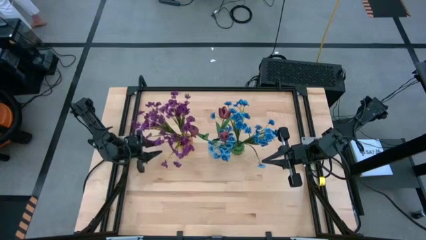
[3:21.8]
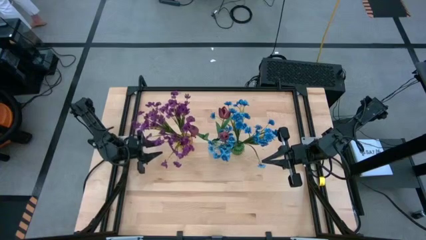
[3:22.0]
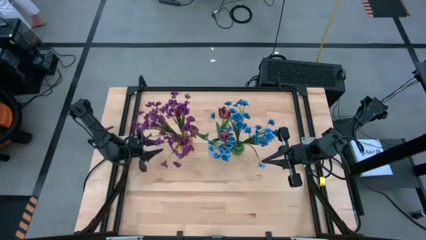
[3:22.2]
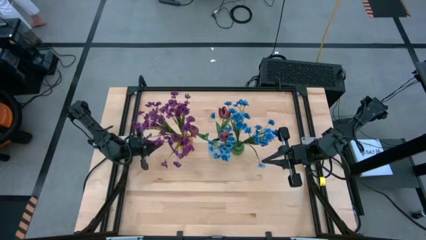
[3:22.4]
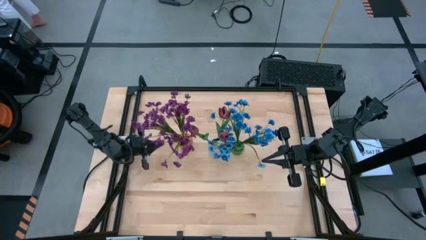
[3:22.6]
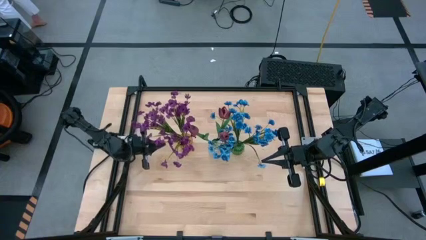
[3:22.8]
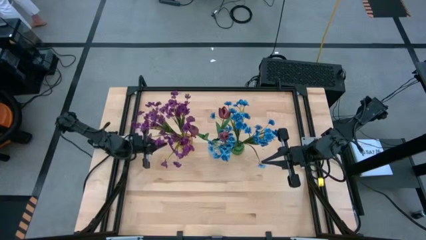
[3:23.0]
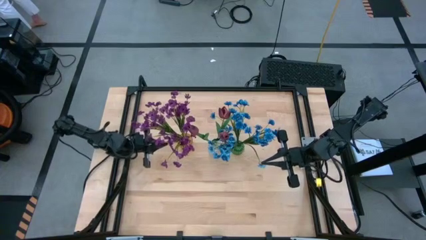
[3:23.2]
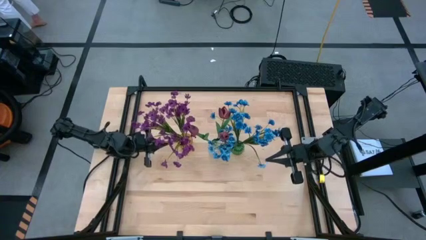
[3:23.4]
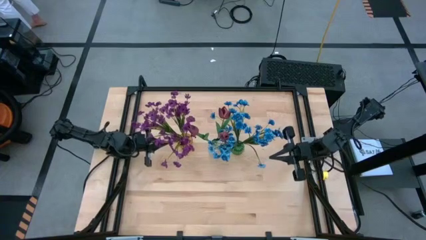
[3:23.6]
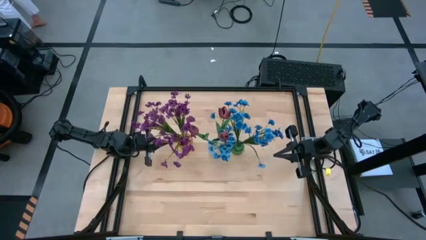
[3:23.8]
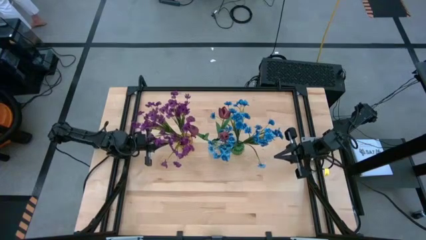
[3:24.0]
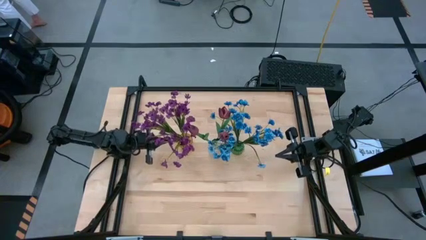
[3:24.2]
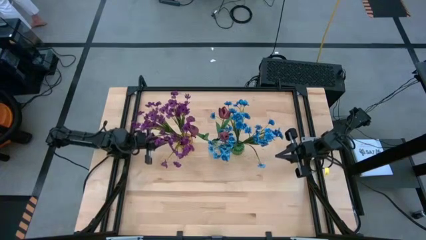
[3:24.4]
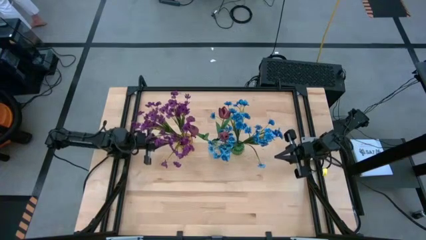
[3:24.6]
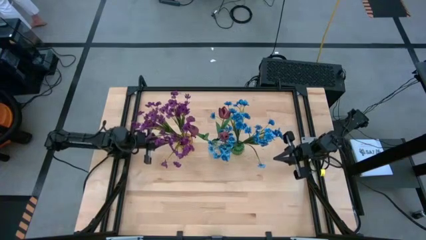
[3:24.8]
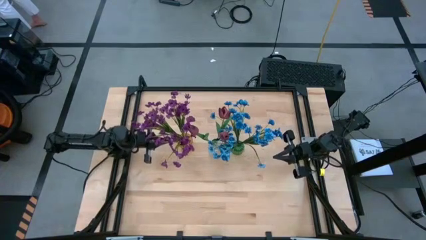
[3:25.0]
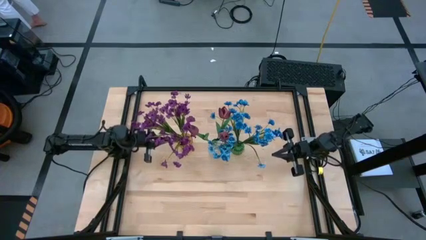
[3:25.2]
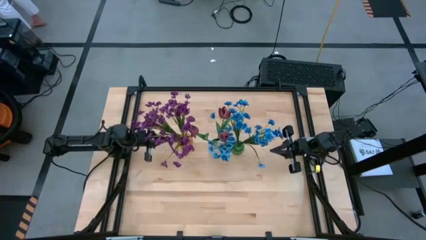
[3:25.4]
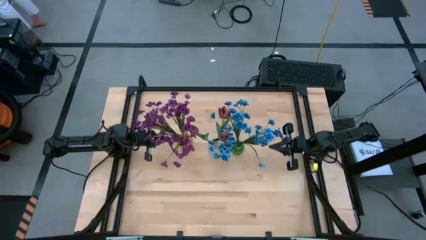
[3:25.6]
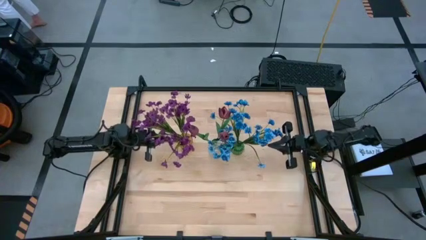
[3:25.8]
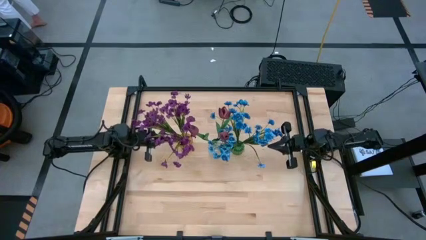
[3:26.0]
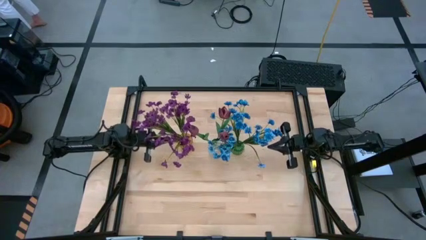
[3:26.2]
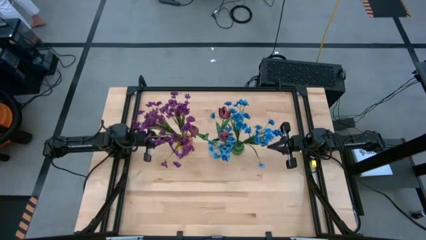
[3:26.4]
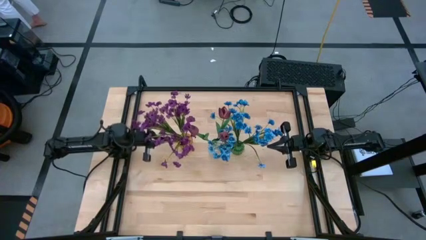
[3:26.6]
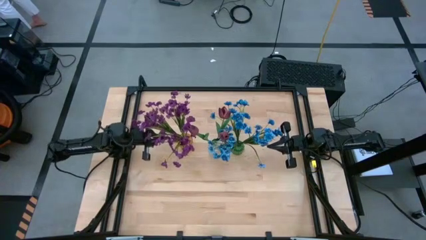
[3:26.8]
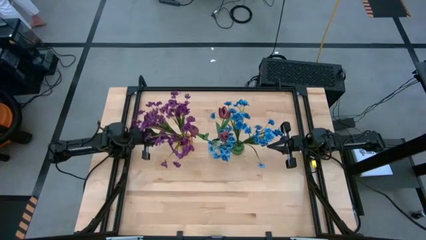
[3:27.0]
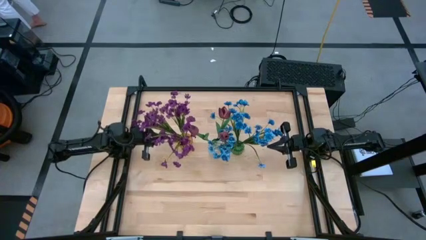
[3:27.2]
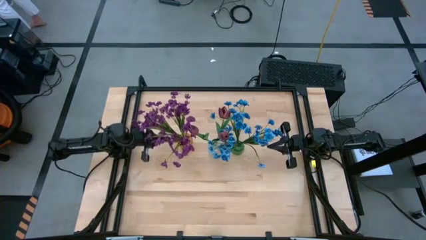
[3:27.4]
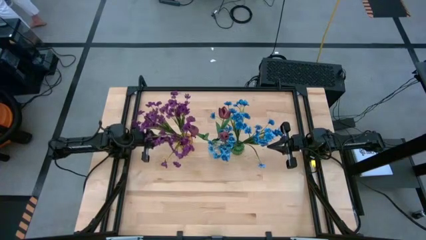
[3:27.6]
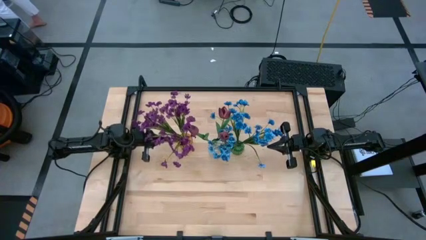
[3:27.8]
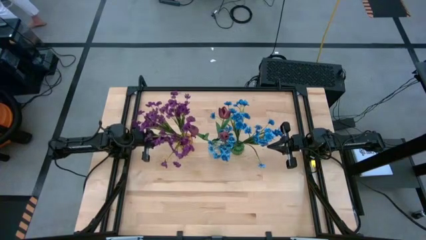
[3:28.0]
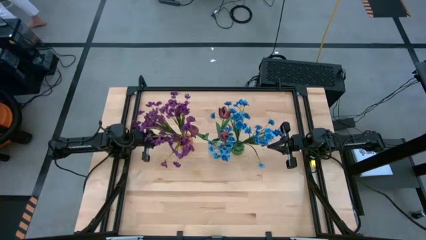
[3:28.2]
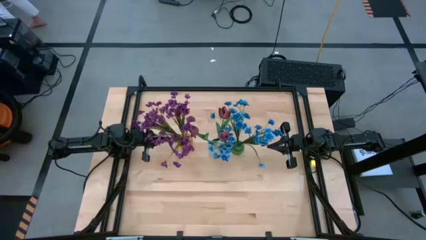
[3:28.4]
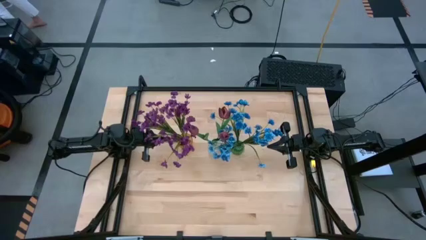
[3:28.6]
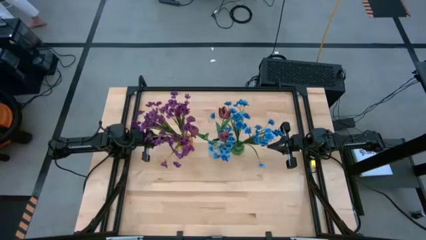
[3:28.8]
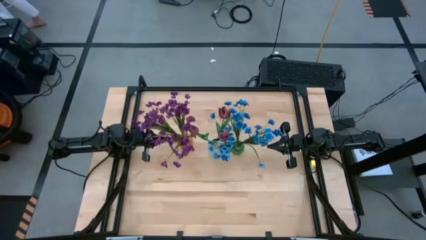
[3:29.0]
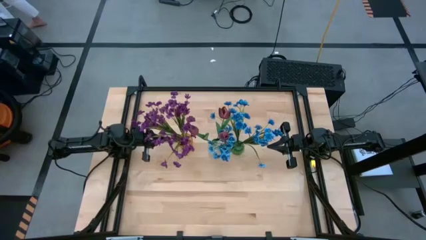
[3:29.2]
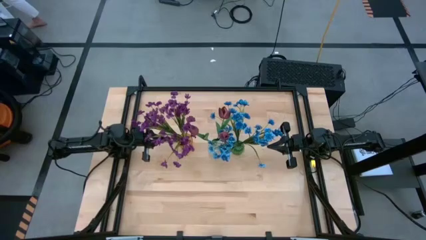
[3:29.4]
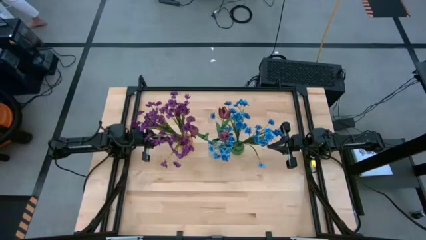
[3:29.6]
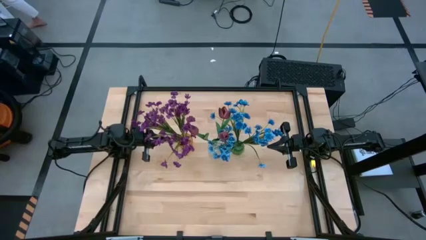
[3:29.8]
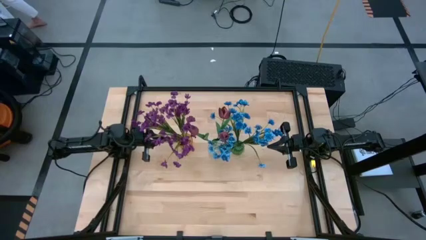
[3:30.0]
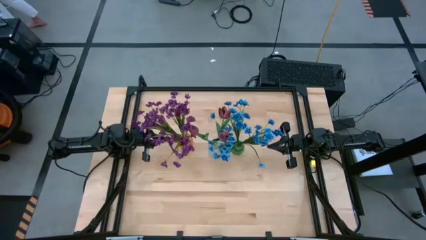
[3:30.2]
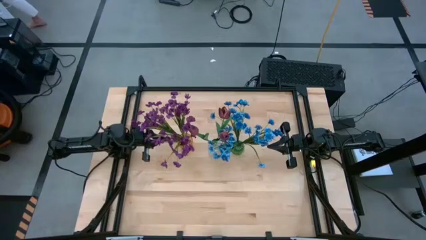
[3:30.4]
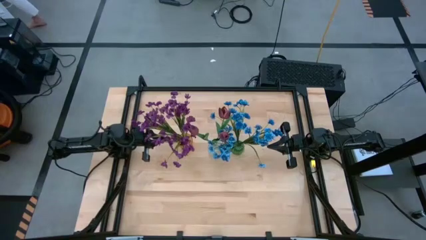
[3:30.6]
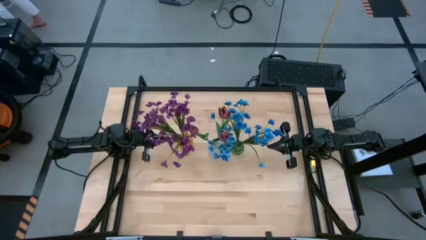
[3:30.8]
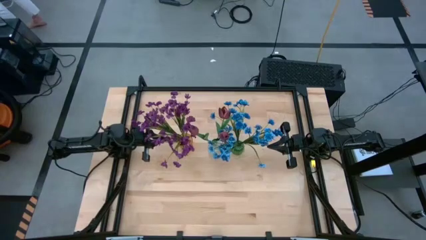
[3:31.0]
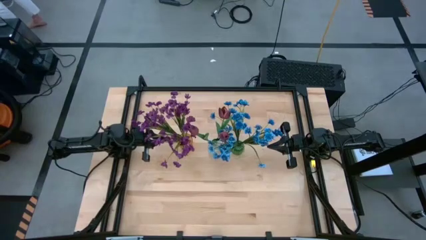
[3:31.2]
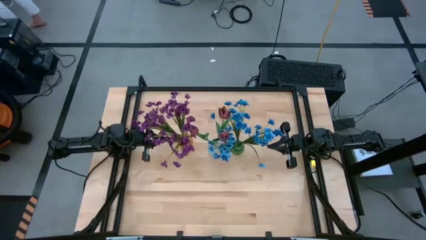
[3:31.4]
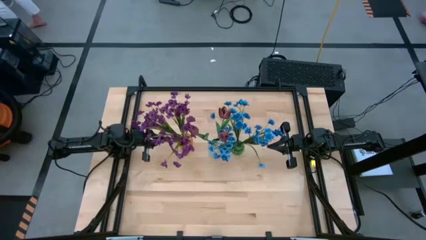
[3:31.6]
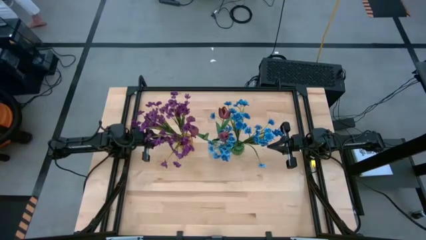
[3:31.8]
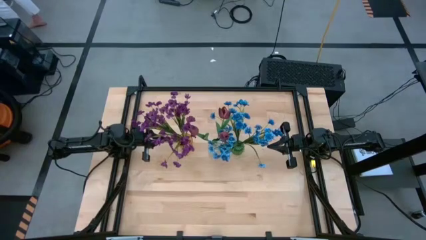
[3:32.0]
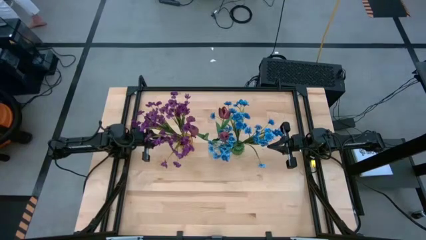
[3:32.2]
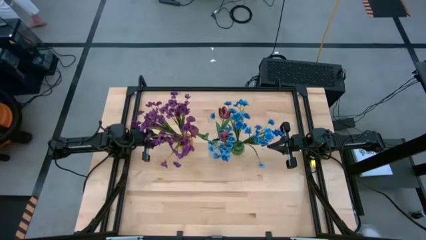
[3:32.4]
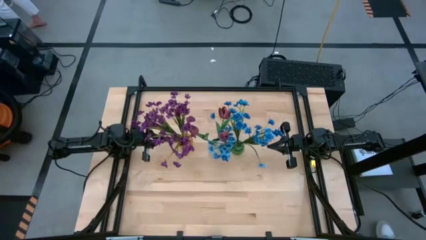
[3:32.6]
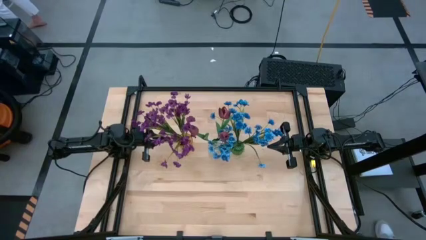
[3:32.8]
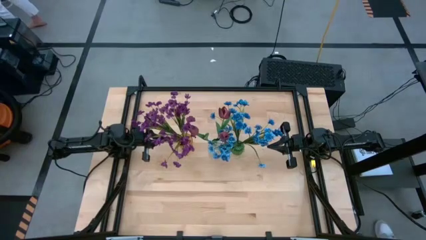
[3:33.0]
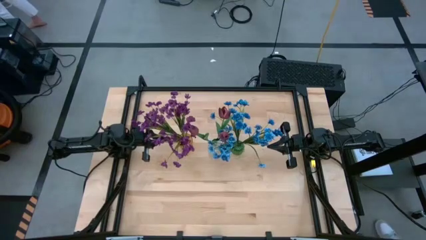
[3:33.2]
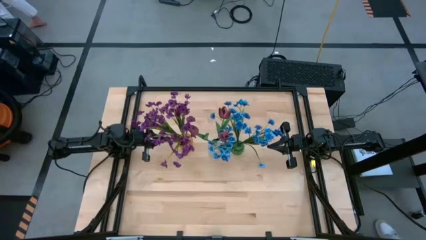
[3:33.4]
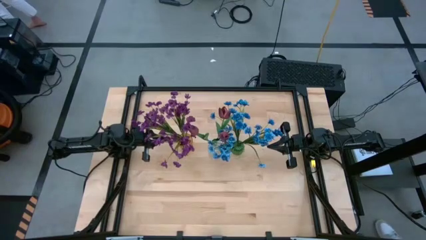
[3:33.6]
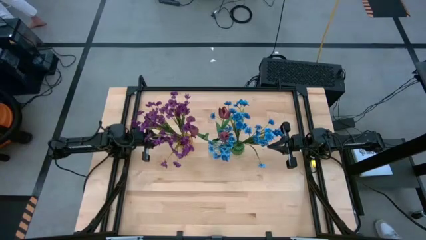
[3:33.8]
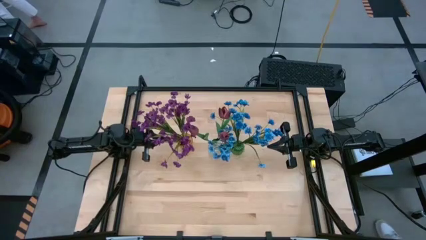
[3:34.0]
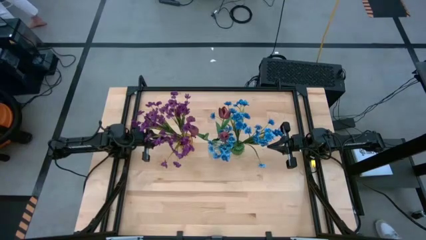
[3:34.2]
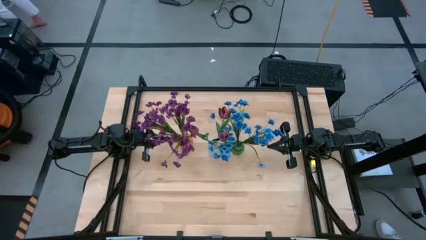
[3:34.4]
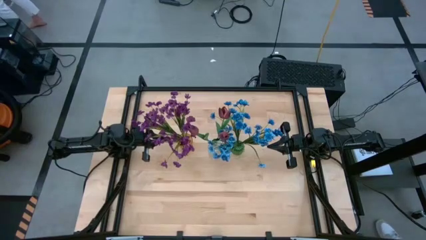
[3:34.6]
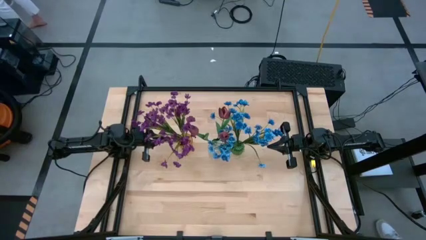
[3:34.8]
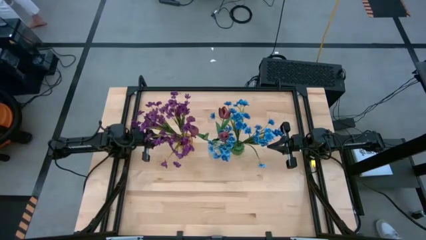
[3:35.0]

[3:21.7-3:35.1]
Task: Sort flowers into vase by color
Return to Home Position

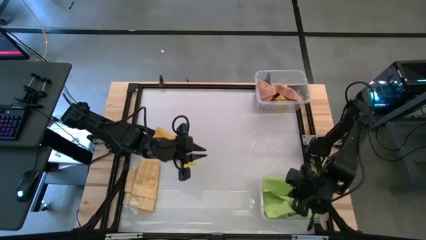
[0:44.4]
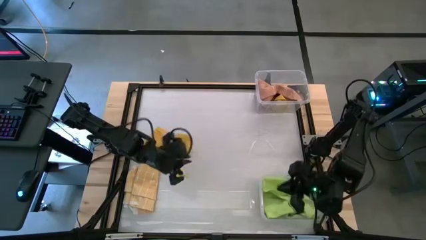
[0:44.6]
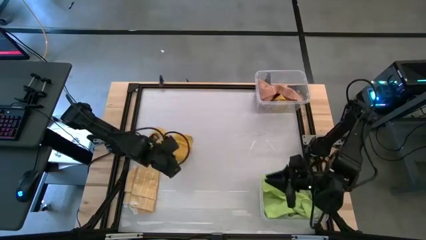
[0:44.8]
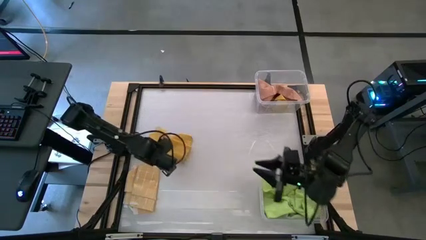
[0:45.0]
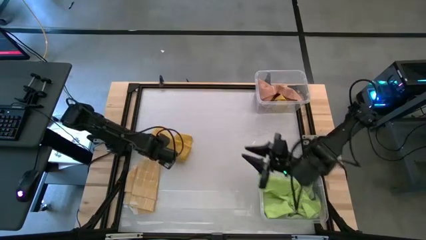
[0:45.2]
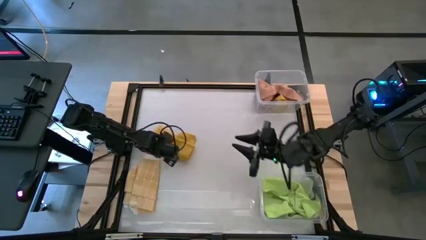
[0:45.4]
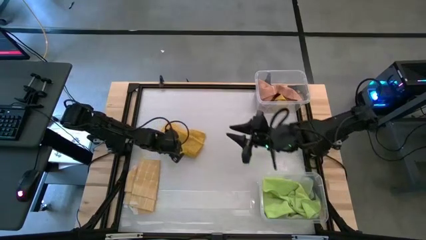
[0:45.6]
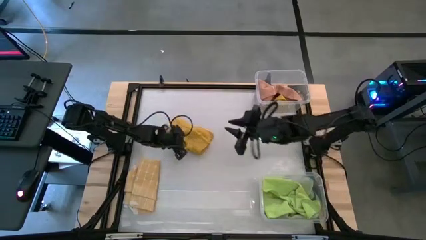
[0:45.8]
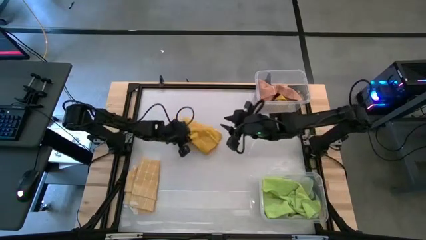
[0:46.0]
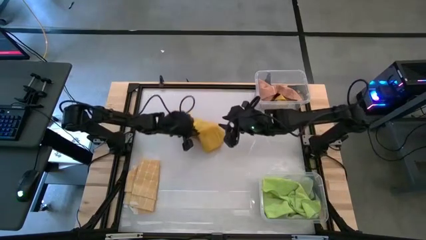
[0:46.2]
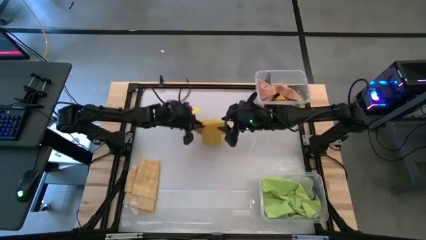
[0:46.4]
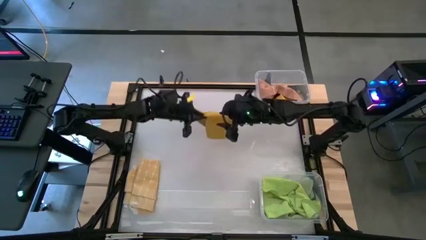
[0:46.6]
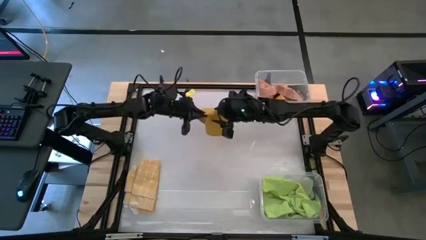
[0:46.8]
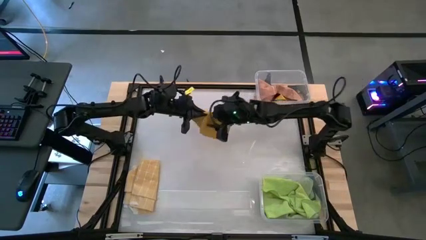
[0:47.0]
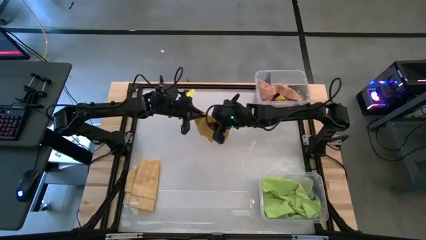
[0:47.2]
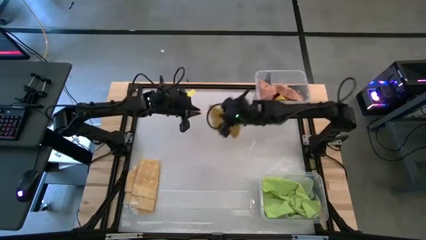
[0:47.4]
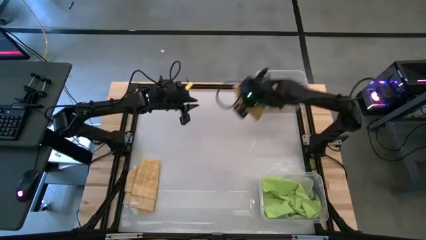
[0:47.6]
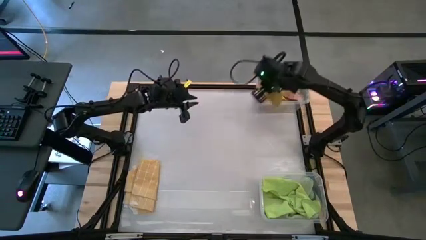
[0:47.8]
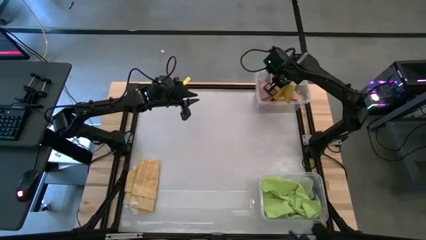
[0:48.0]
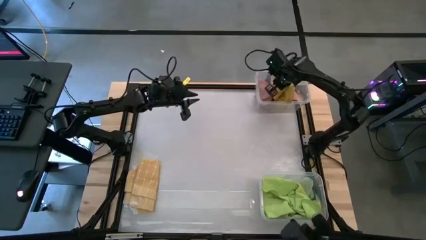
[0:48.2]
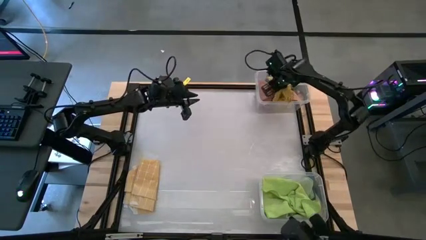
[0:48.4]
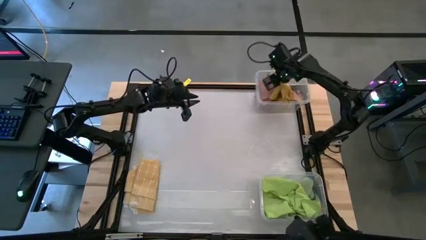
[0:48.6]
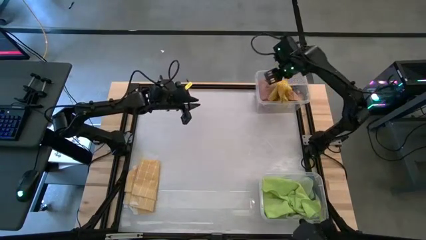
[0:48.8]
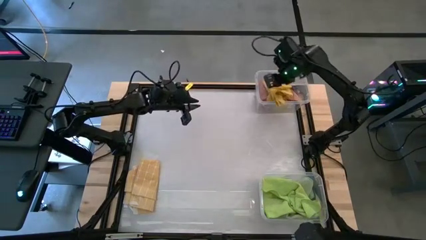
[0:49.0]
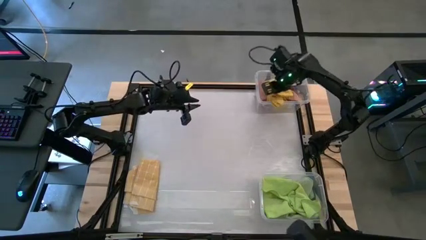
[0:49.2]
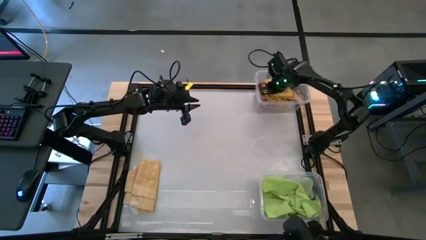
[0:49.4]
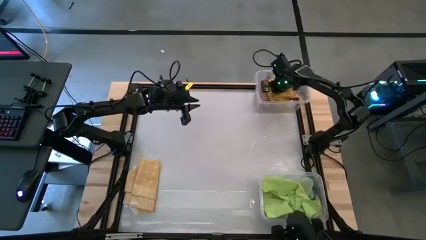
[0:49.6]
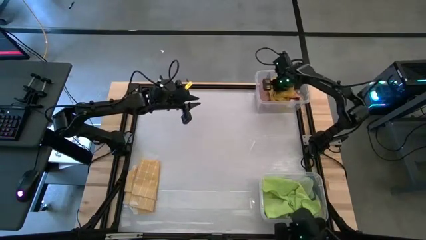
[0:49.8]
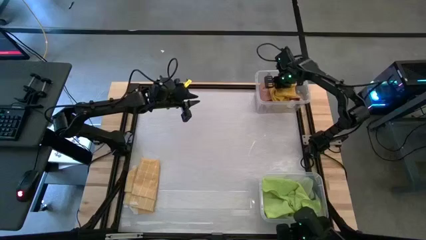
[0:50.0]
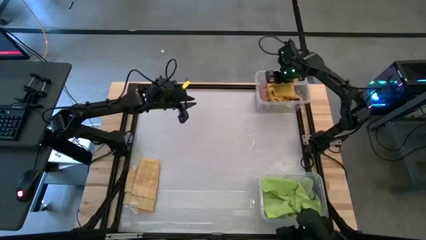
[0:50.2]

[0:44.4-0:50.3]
Task: Sort microfiber towel by color & place in baskets
Put the yellow towel into the top transparent bin
